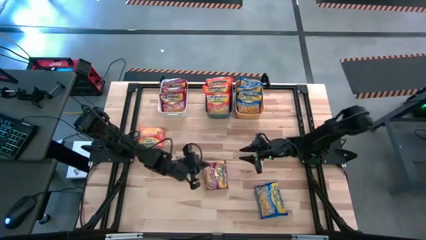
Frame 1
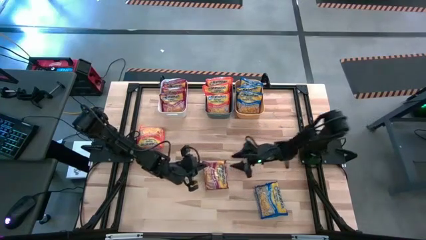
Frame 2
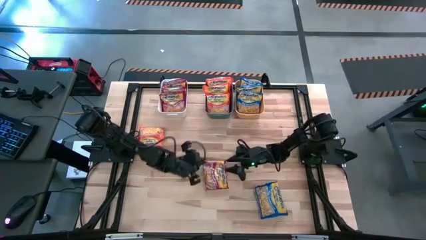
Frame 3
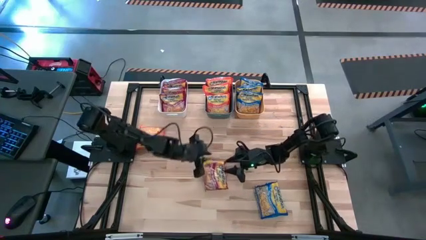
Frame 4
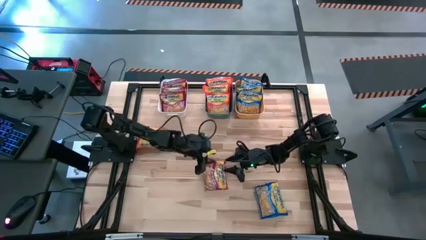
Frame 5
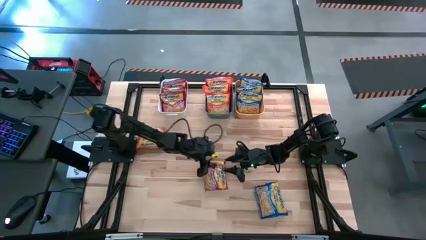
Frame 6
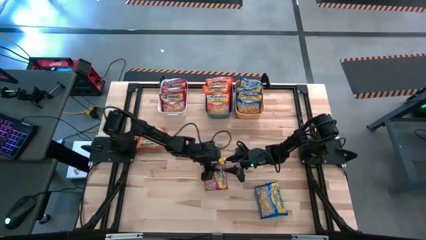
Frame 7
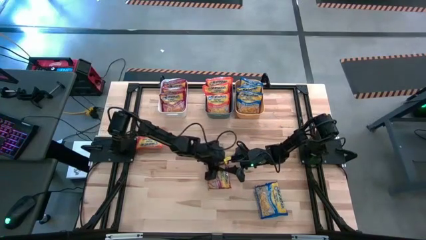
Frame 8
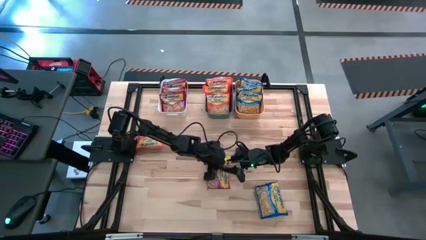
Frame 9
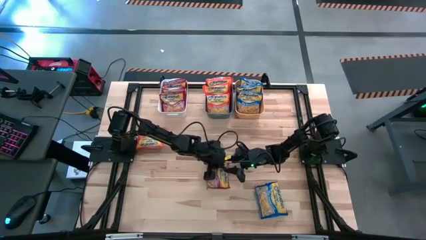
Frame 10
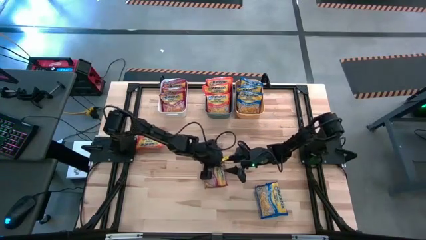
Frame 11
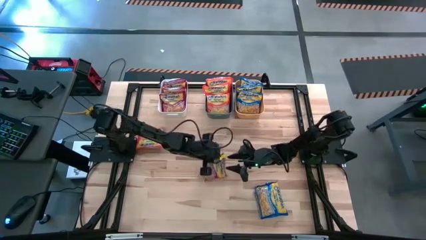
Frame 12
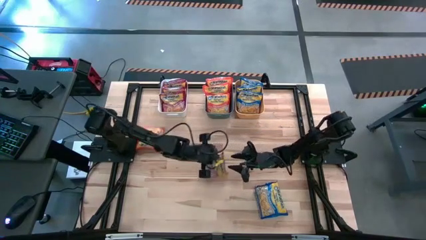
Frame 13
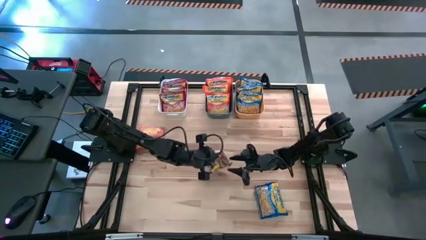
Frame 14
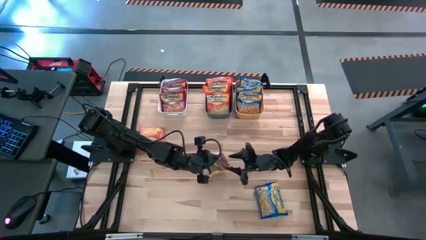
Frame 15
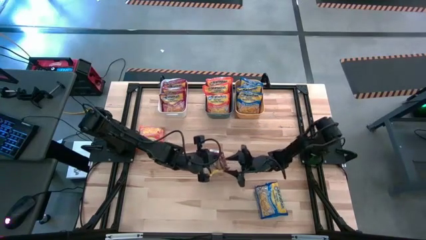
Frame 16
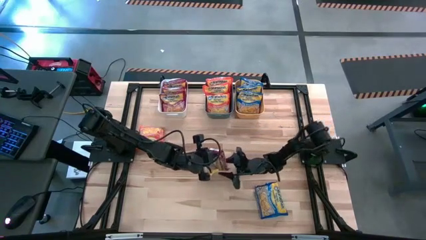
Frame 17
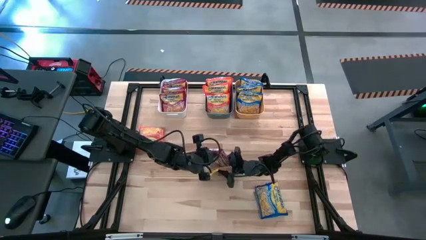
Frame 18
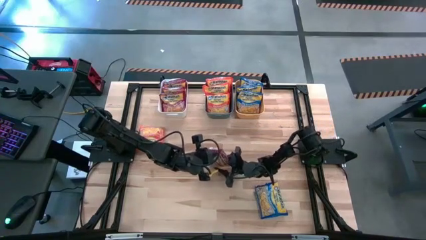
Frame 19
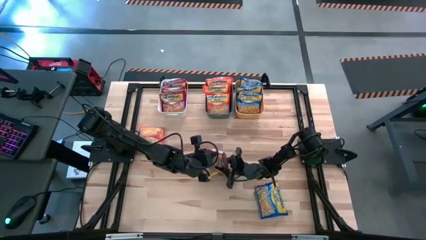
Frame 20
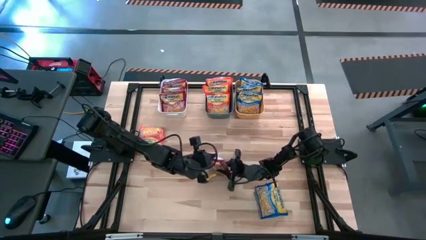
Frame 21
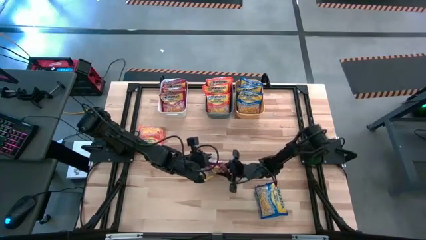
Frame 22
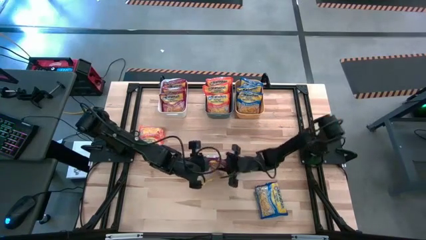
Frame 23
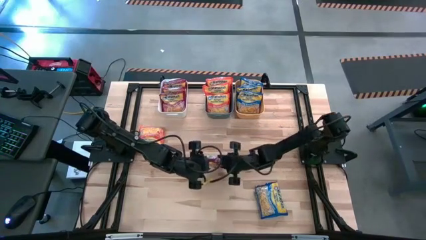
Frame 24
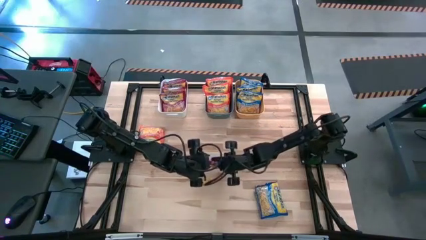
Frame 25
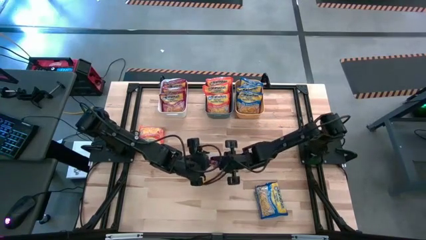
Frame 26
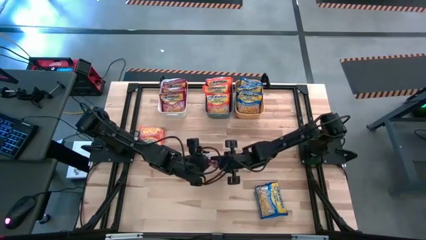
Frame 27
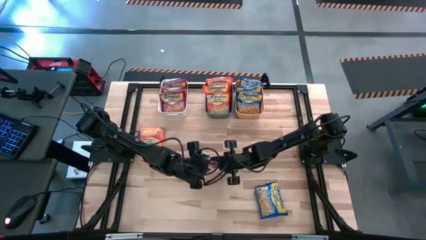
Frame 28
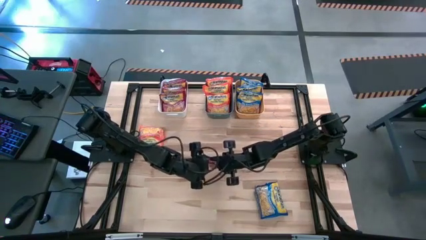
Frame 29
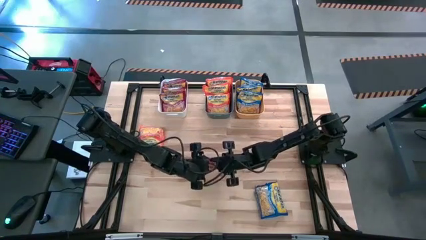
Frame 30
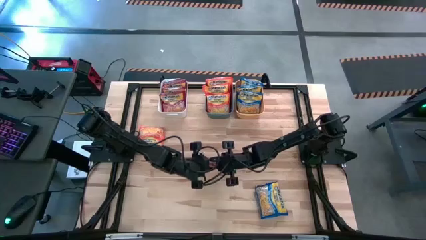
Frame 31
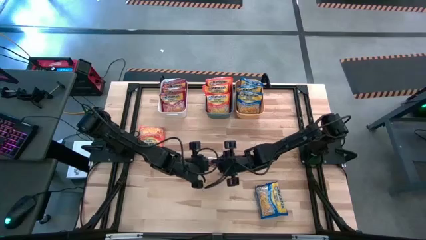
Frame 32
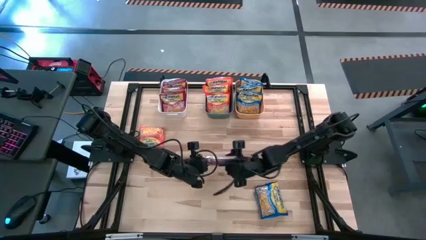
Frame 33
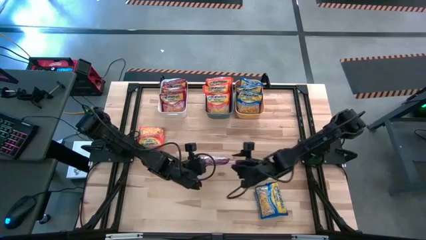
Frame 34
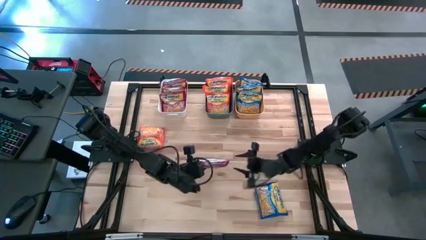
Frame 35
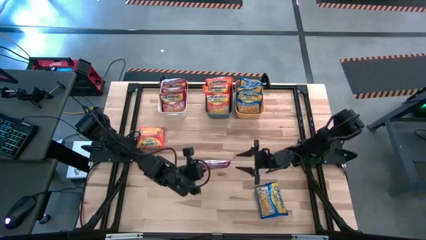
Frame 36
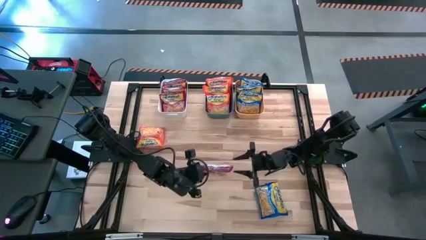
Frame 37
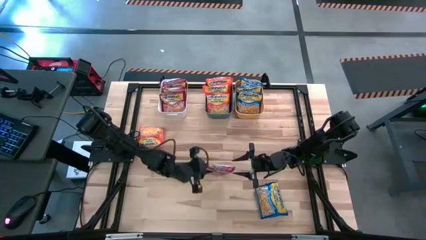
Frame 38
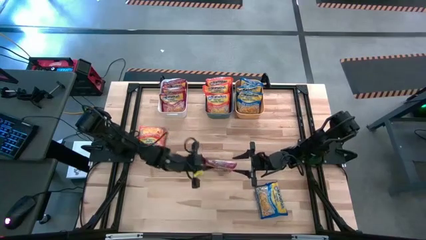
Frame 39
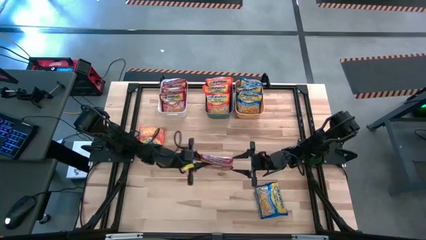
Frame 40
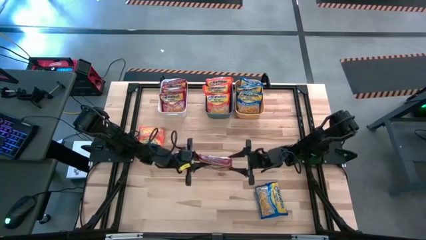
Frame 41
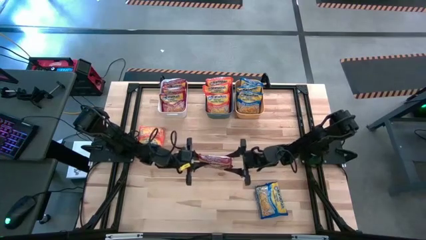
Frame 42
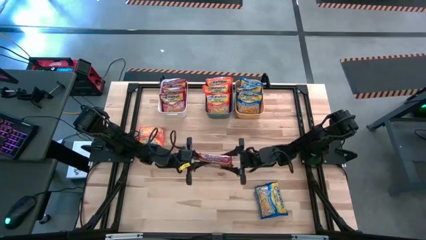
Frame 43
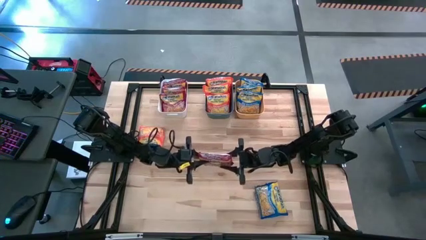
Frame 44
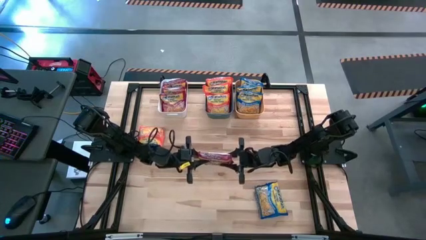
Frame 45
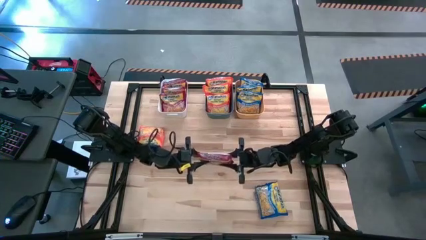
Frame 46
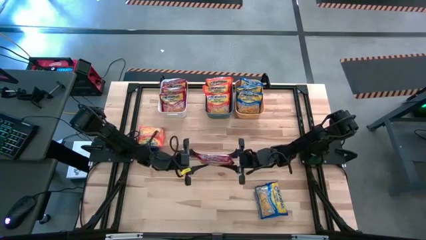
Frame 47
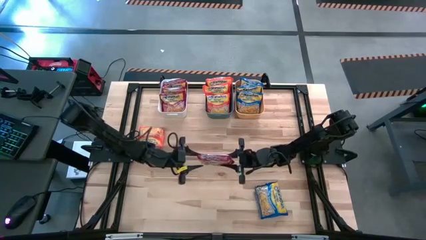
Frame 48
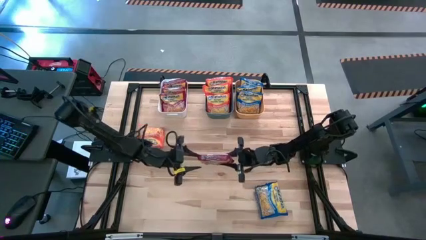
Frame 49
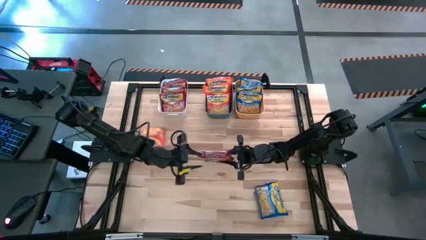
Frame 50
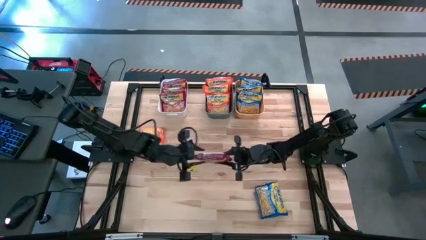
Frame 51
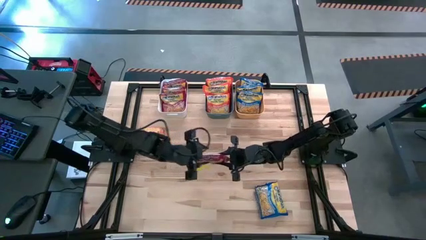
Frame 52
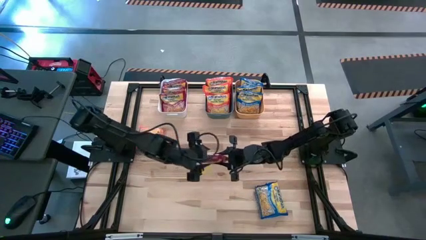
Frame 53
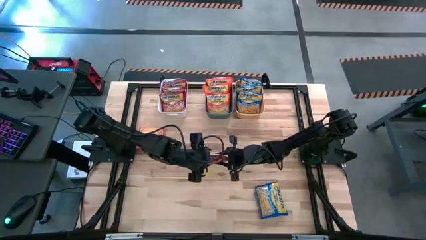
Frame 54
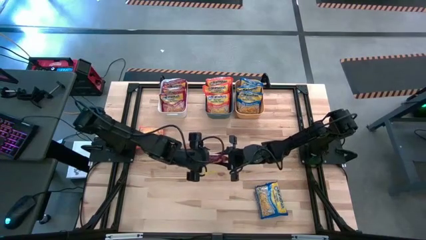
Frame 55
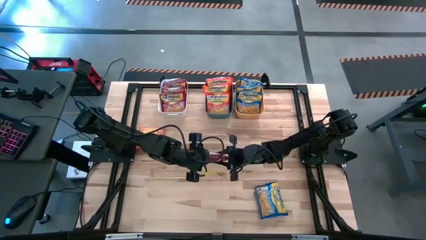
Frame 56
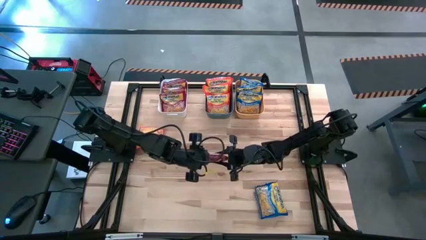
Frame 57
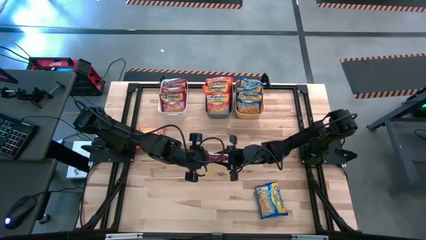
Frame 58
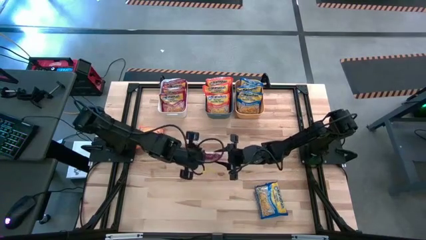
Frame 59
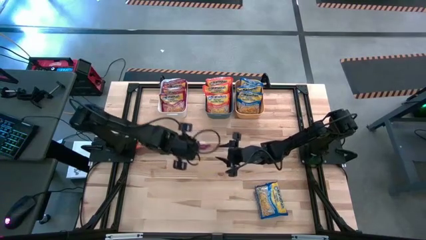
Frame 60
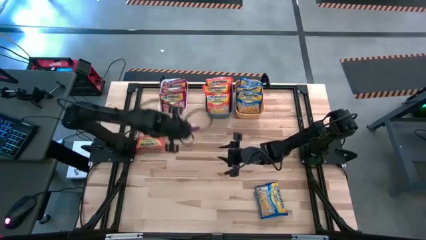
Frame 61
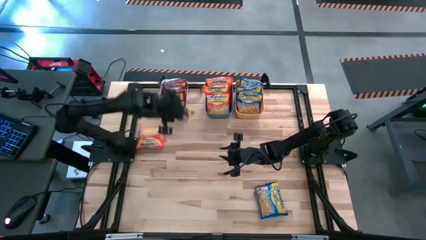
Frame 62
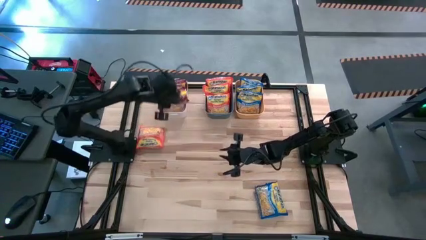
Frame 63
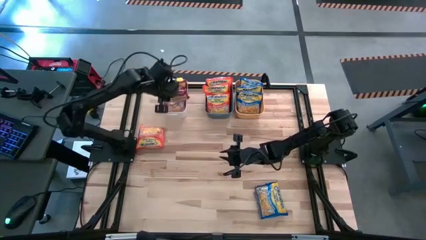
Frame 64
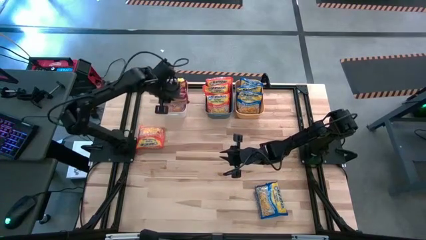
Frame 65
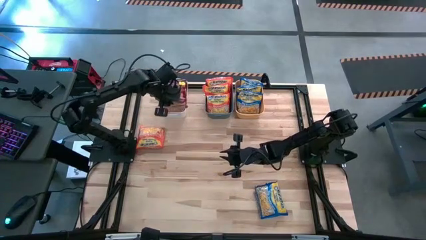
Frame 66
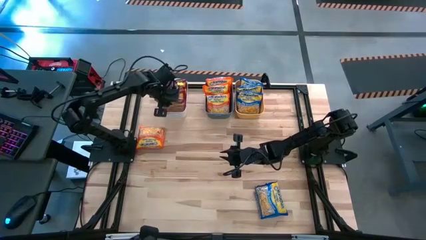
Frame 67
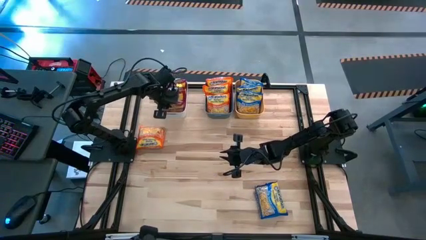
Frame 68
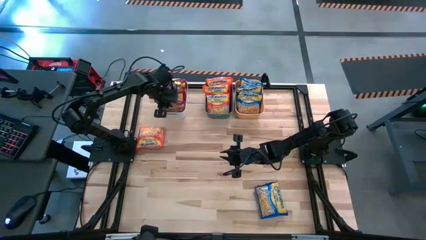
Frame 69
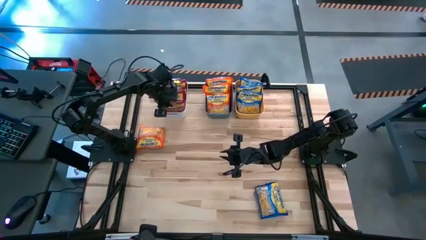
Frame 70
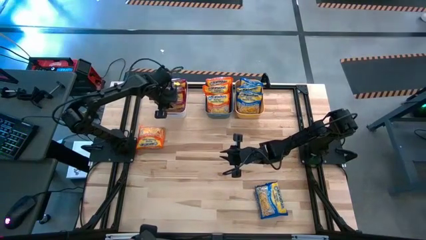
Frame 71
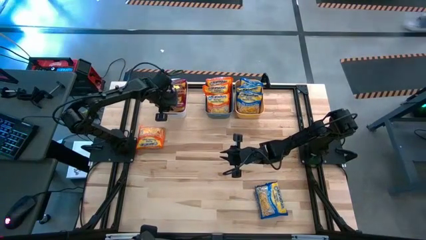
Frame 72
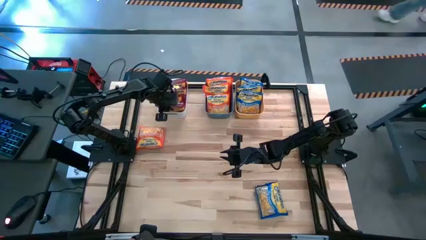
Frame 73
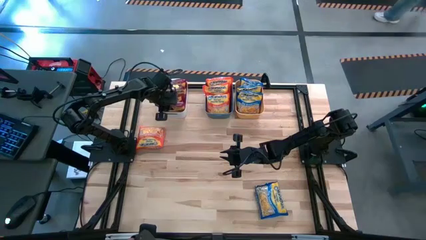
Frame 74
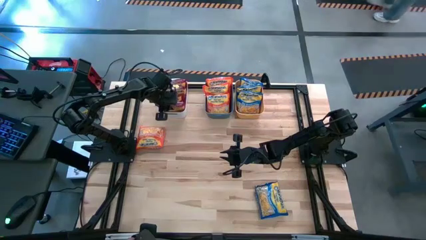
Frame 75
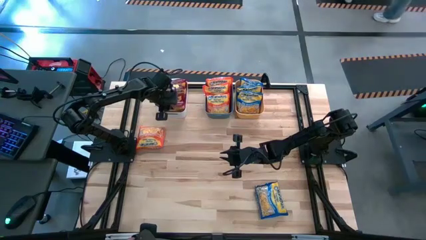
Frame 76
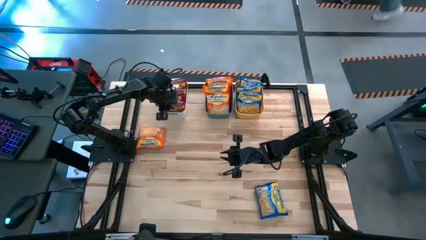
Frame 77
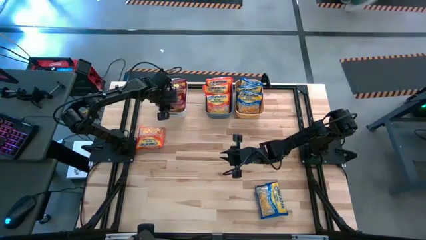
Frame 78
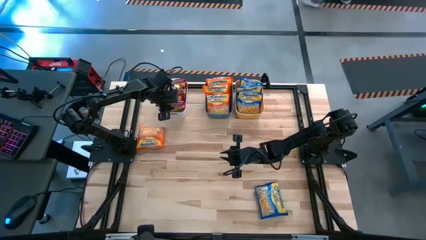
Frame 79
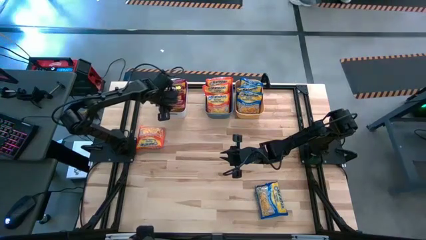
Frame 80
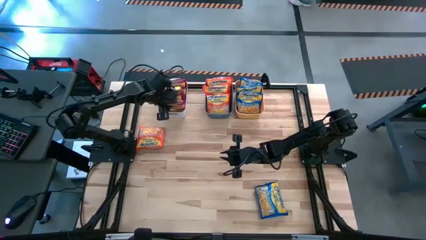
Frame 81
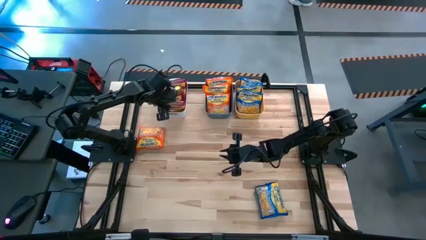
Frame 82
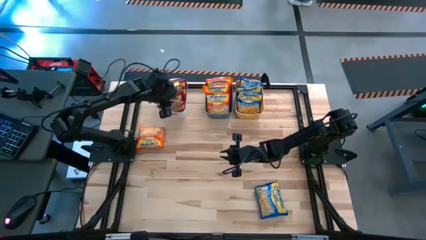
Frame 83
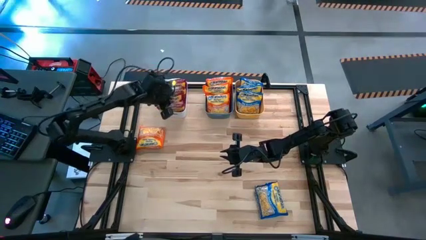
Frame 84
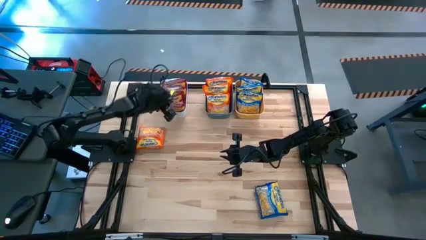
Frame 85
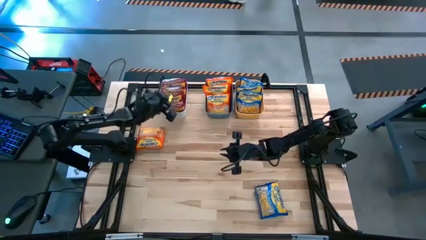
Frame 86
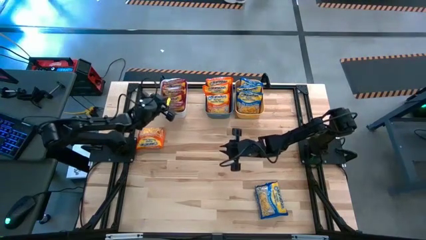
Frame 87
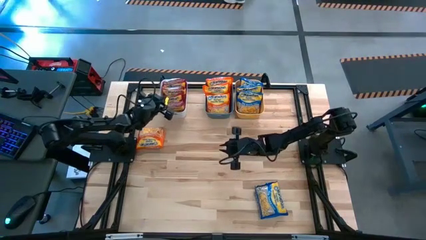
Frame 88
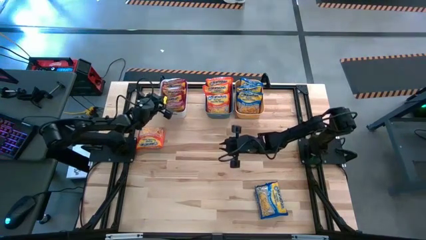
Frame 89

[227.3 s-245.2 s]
Task: Sort Maruchan noodles
Put the red noodle pack into the white bin
